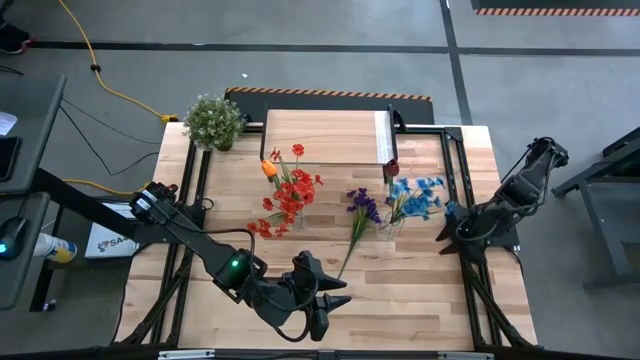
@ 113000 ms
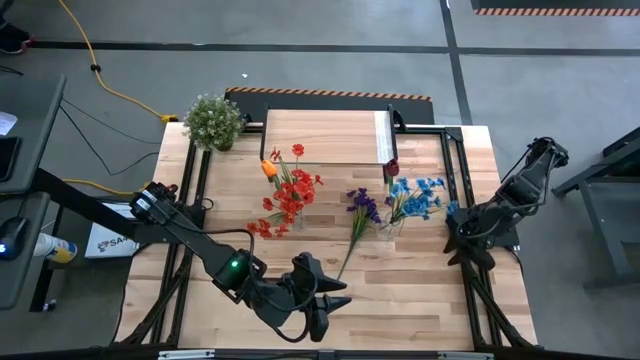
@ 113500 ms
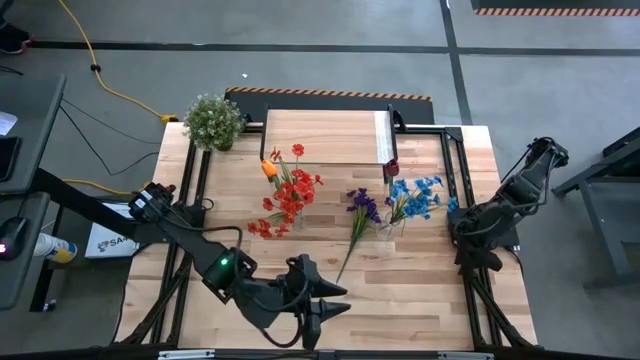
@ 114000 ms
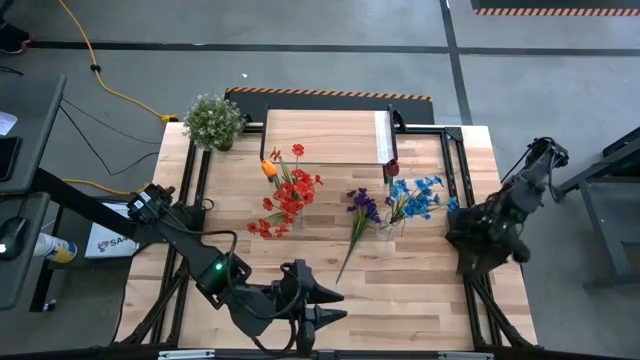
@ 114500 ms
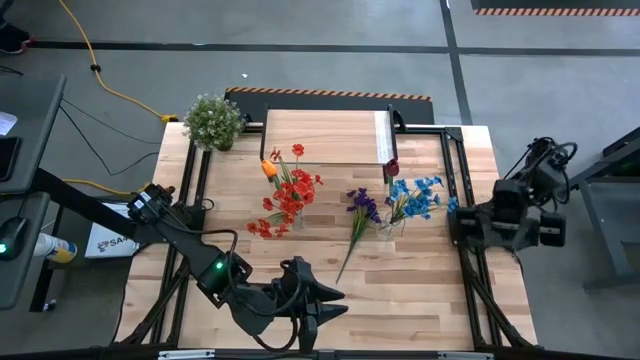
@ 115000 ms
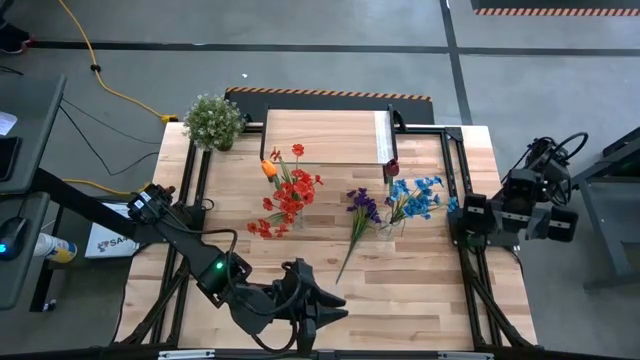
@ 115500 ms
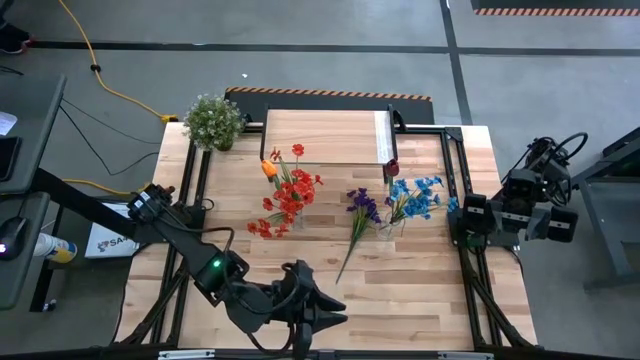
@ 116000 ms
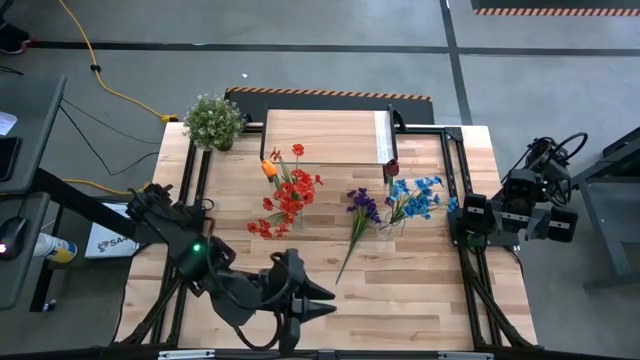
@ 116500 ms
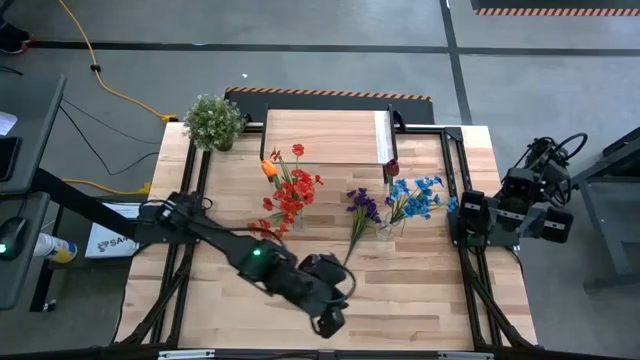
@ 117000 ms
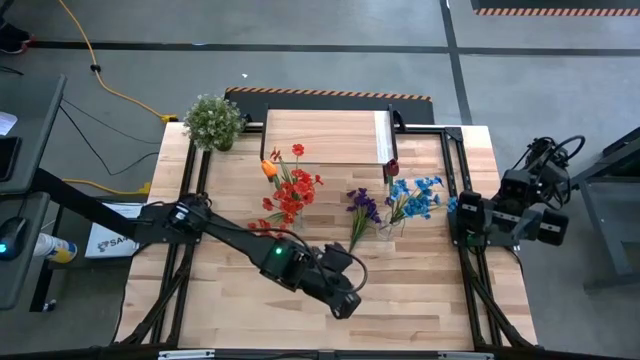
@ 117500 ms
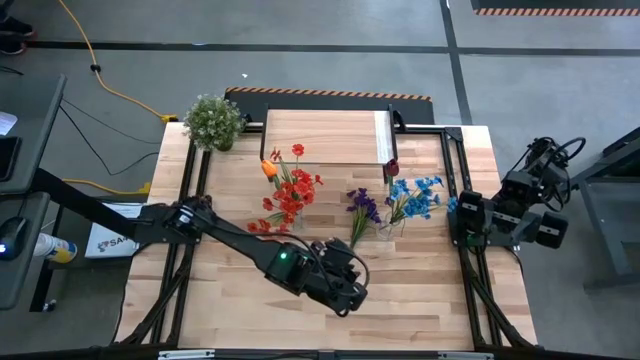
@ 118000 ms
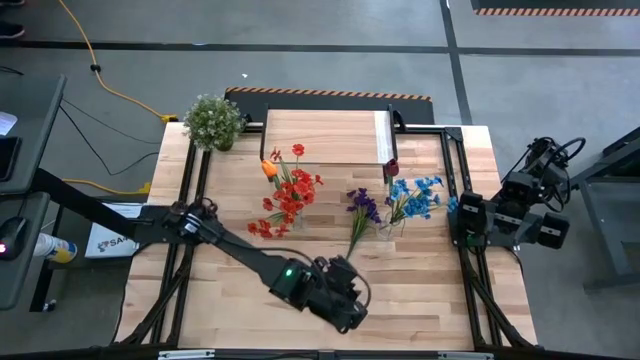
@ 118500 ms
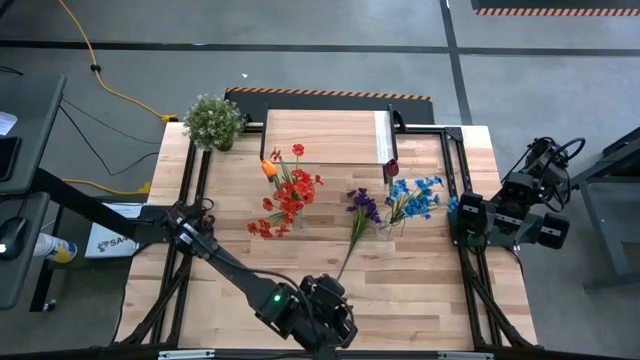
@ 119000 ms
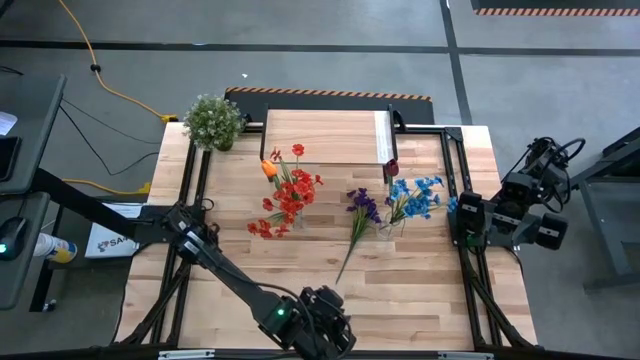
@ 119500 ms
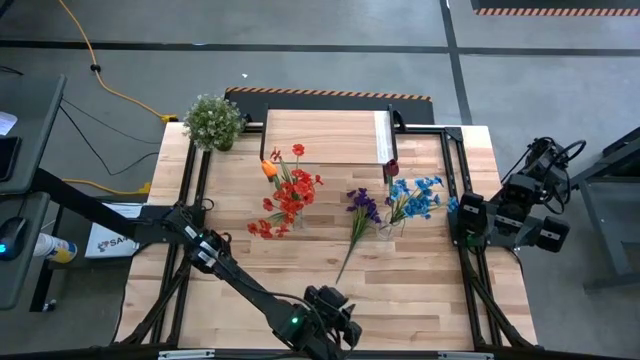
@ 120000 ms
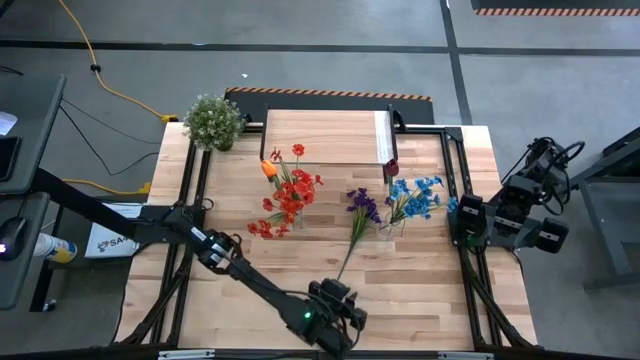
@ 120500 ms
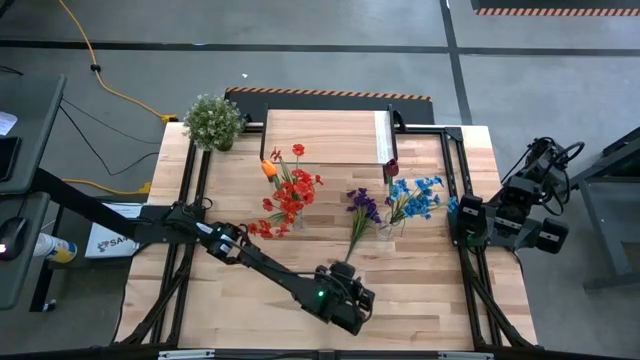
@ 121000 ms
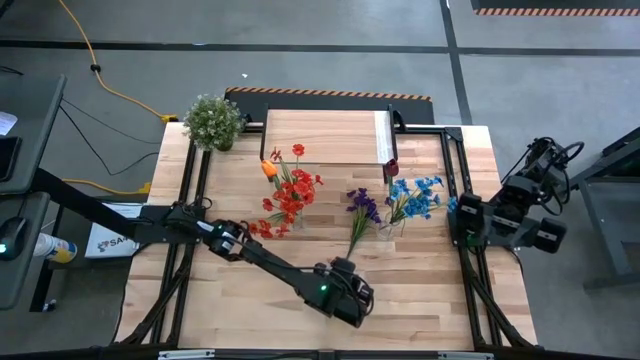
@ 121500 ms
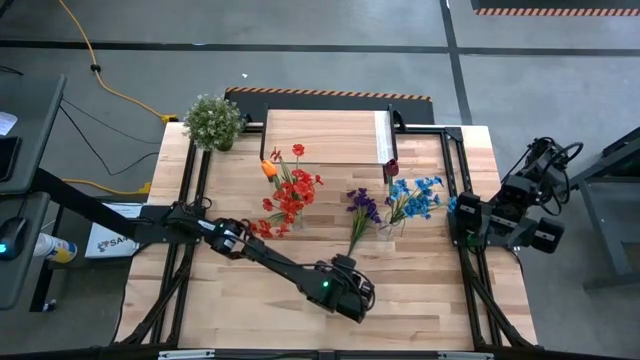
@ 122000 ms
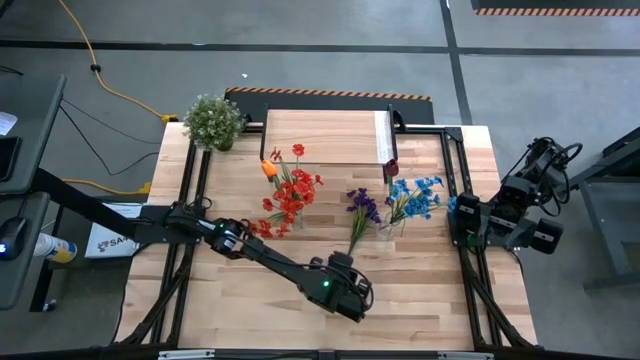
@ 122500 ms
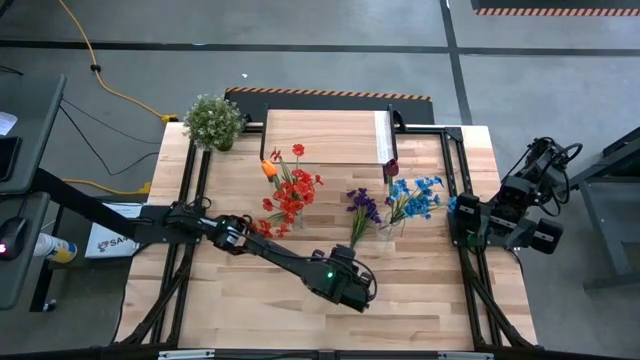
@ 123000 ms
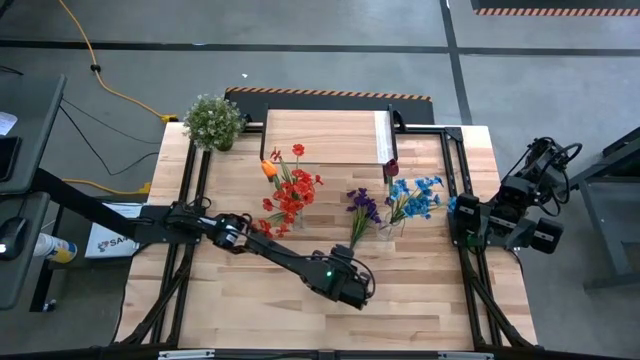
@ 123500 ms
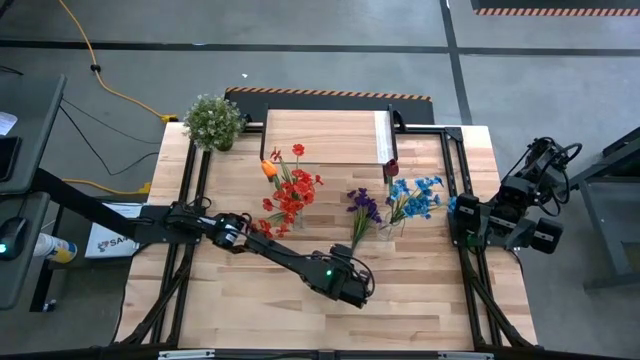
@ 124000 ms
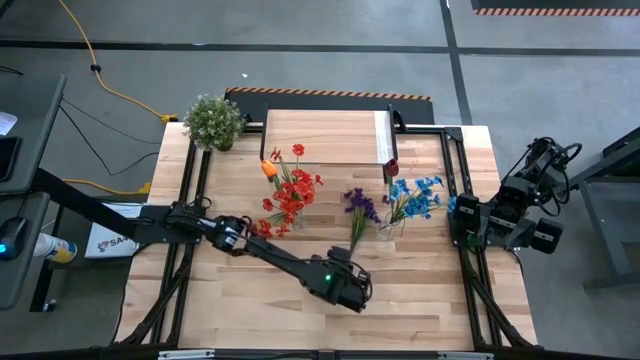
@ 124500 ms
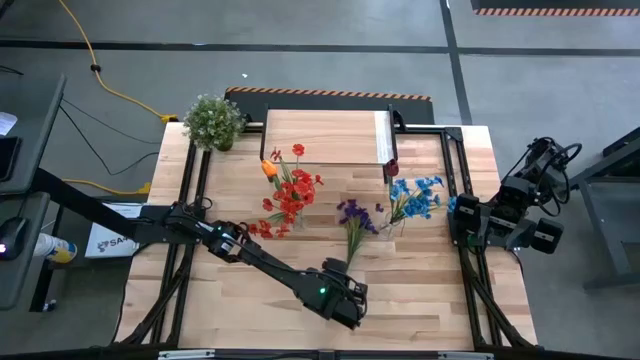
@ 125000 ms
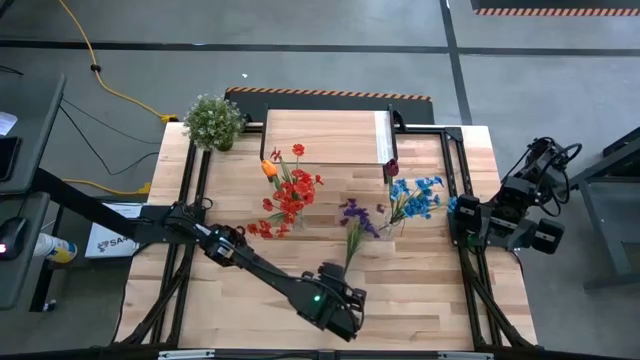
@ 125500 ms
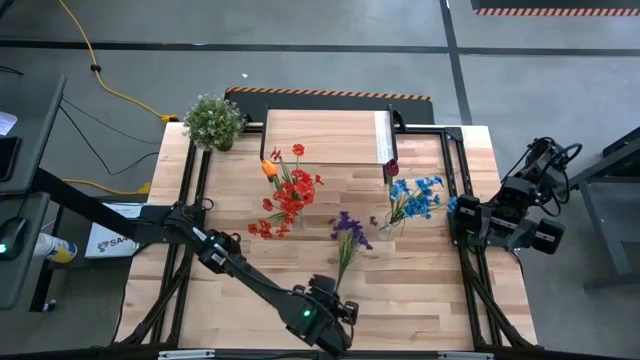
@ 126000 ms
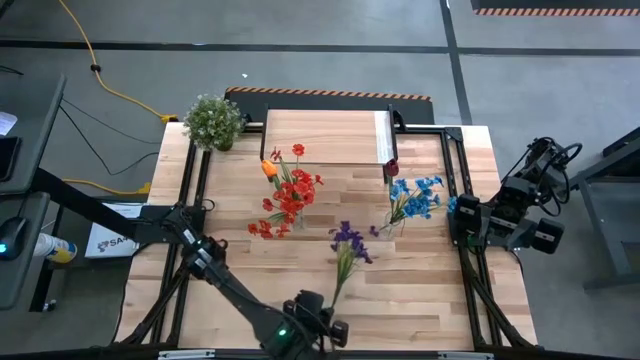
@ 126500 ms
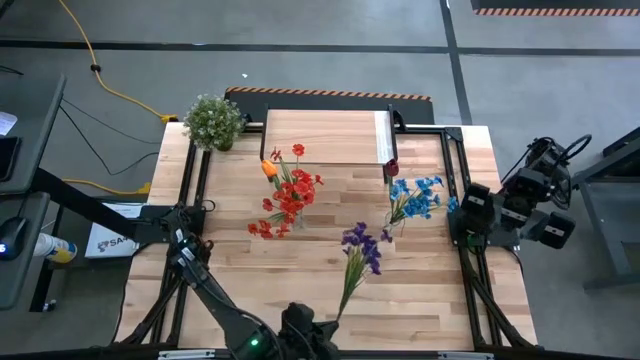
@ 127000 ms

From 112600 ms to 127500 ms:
Task: Pick and place flowers into a vace then onto a shelf
Put the violet flowers into the right transparent vase

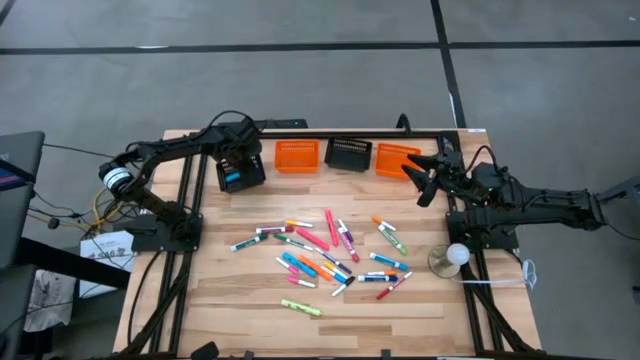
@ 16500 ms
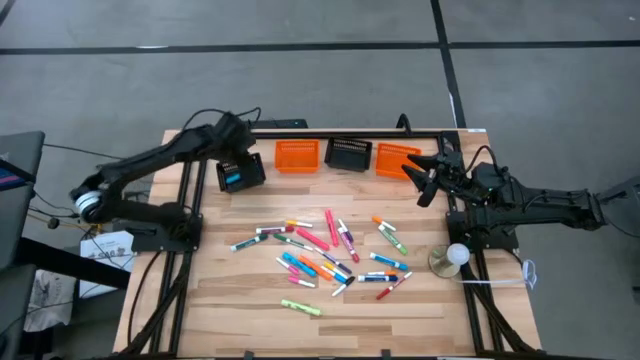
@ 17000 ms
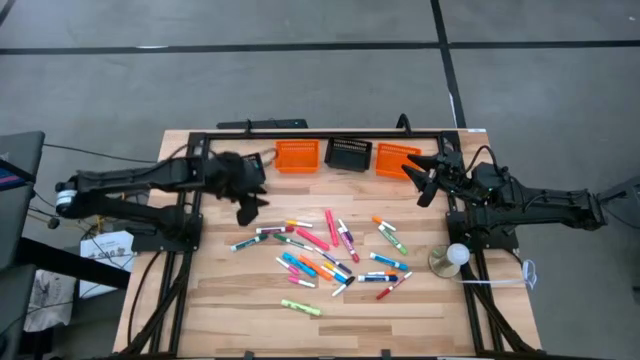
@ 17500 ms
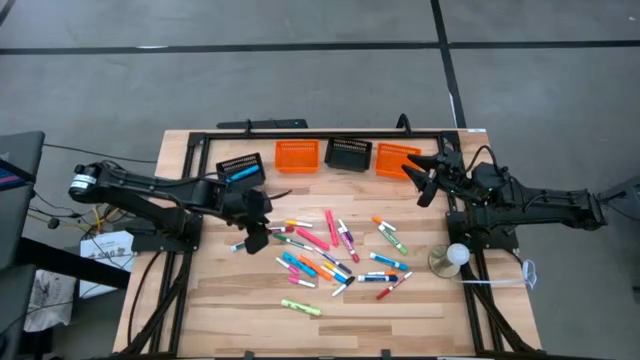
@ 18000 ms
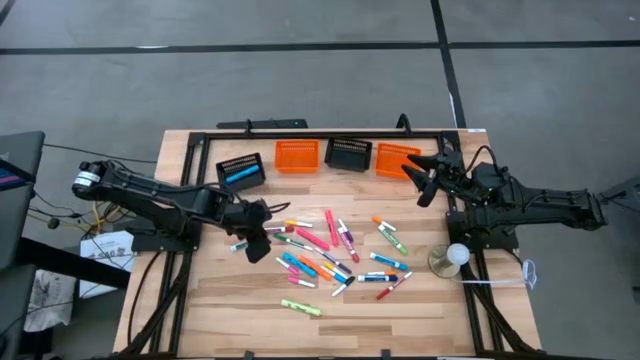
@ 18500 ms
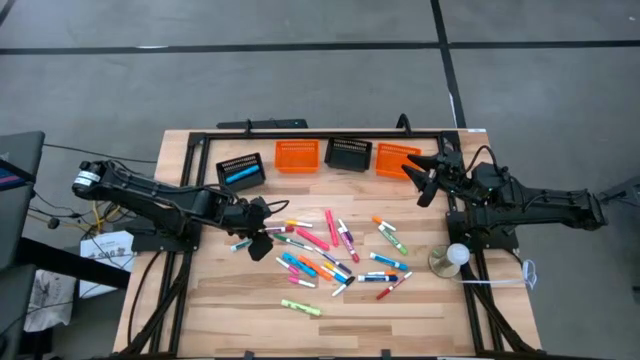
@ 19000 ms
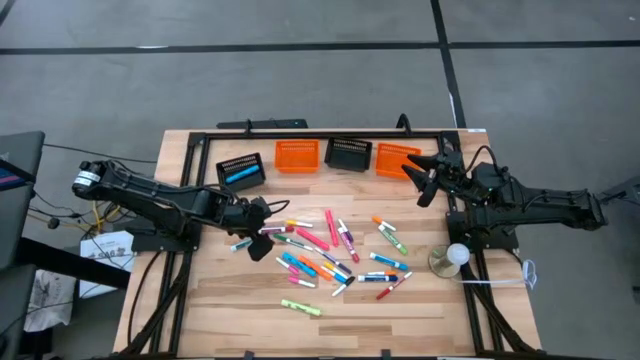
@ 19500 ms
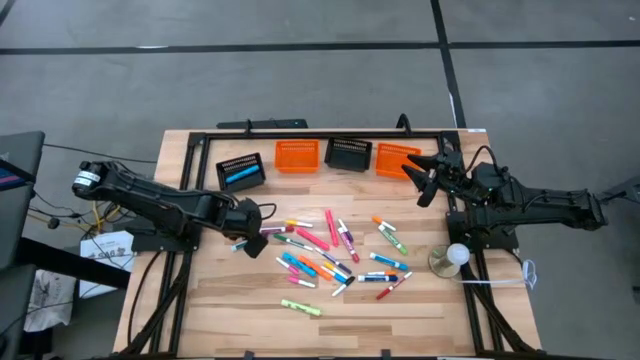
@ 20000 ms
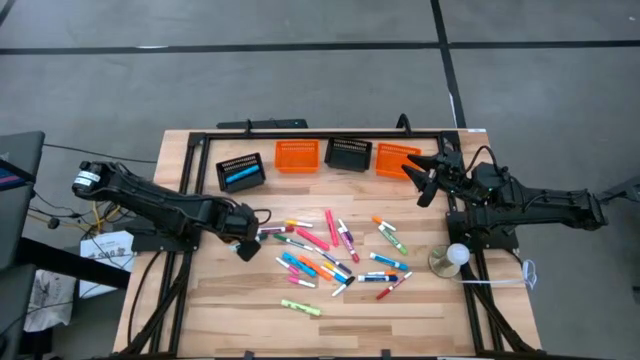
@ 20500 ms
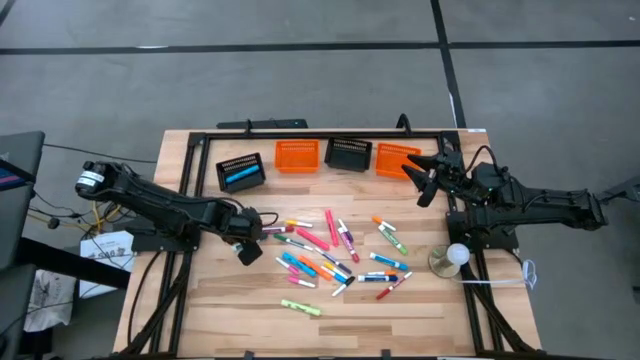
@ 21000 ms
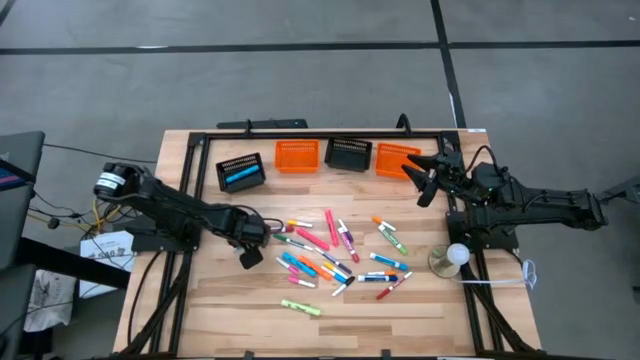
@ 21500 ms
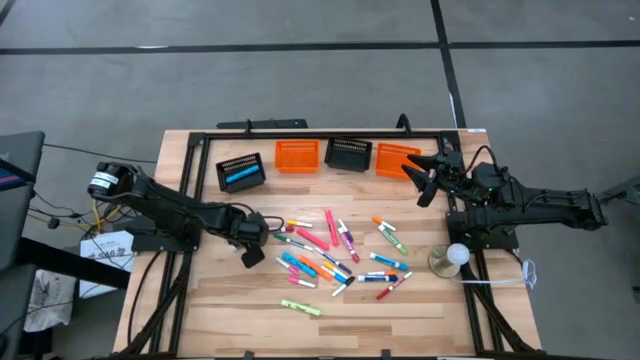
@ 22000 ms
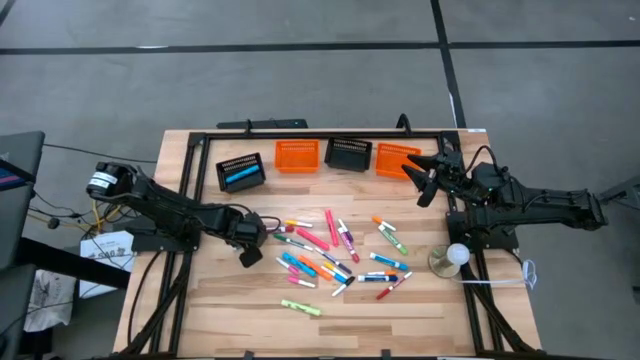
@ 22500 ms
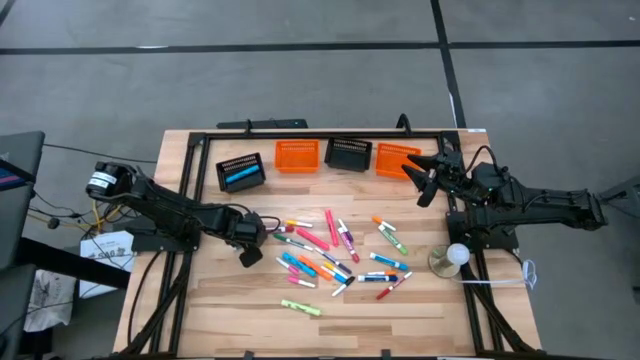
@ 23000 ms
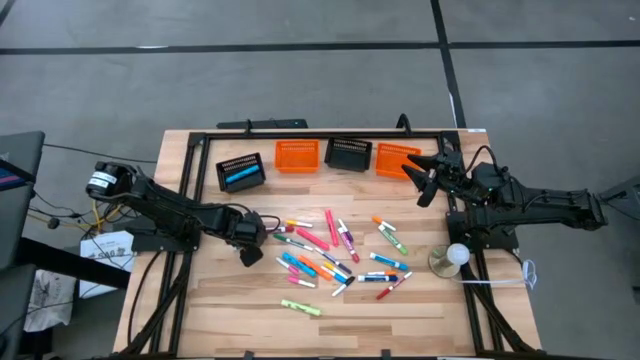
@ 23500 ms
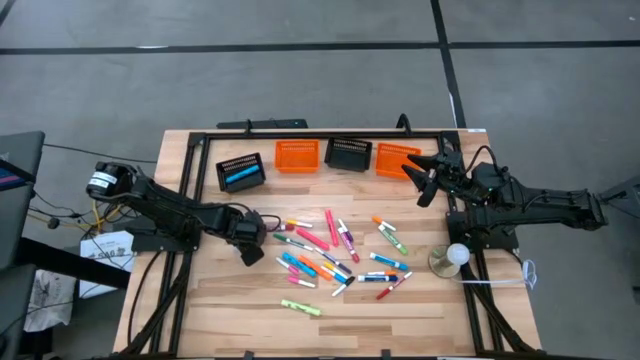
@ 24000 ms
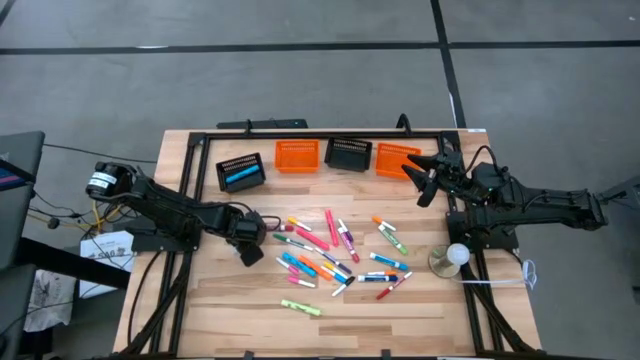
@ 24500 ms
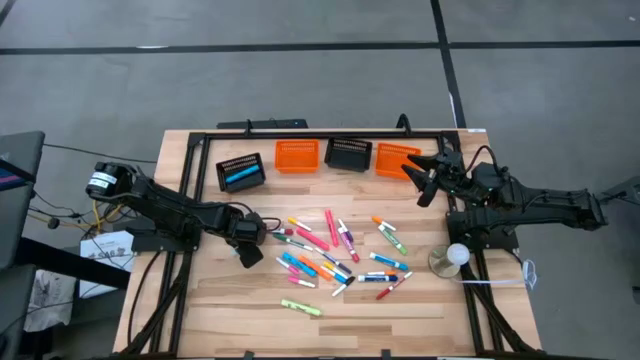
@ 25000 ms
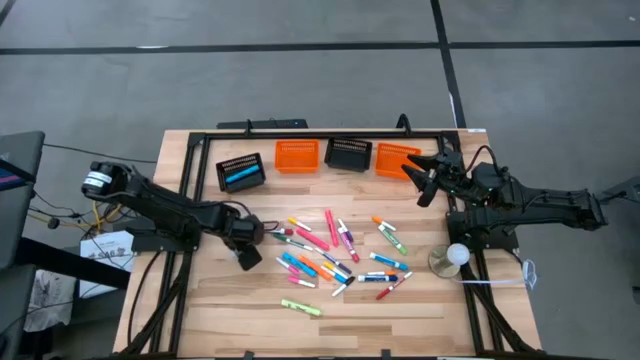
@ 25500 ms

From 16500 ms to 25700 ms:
Task: Pick & Place Markers
Put the large green marker pen into the left orange bin
